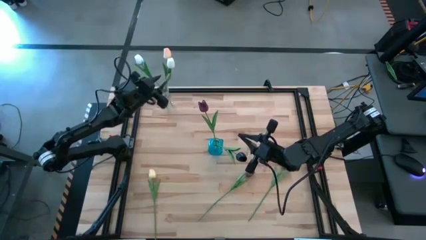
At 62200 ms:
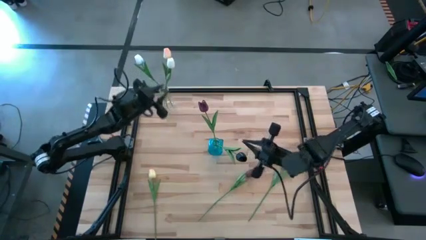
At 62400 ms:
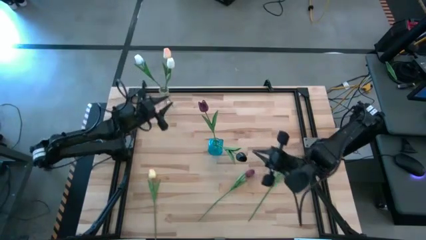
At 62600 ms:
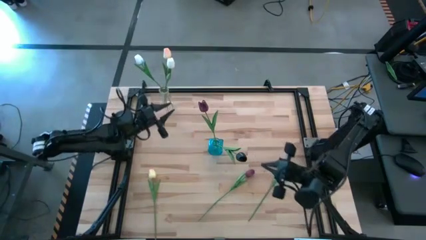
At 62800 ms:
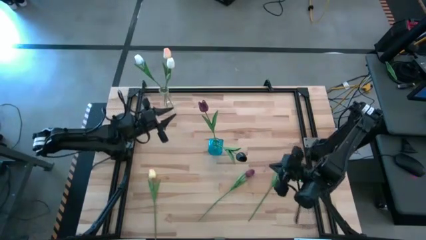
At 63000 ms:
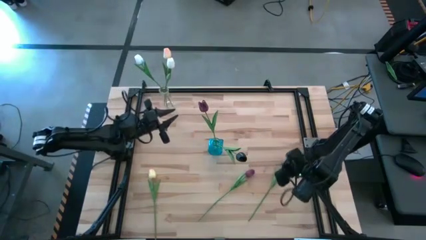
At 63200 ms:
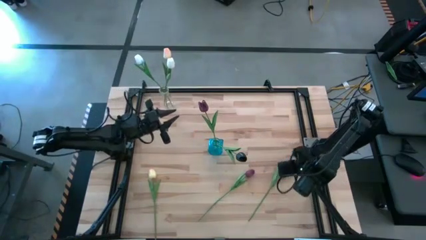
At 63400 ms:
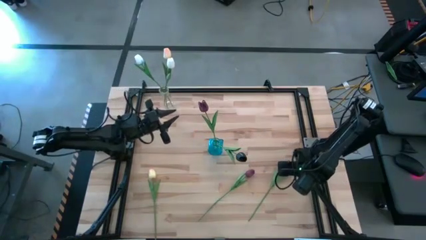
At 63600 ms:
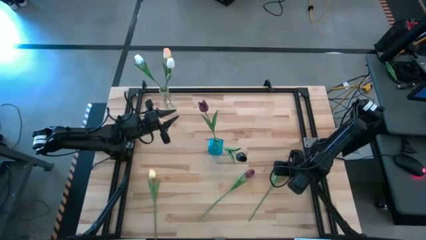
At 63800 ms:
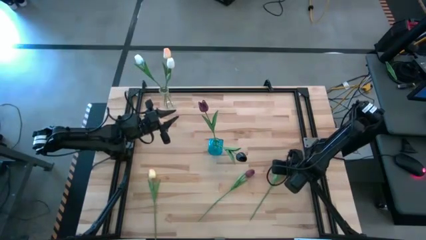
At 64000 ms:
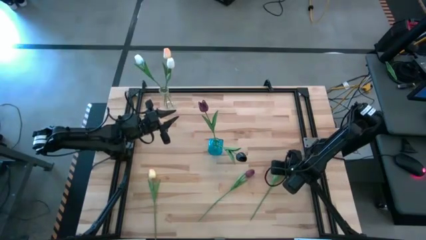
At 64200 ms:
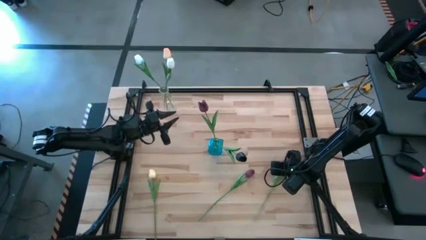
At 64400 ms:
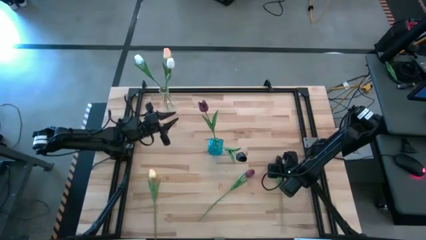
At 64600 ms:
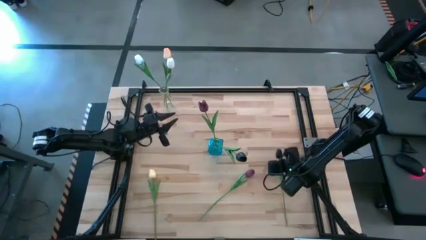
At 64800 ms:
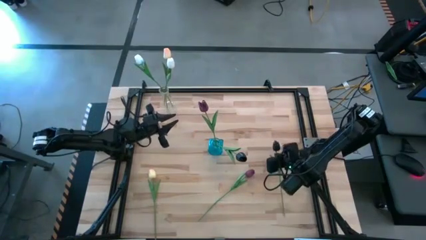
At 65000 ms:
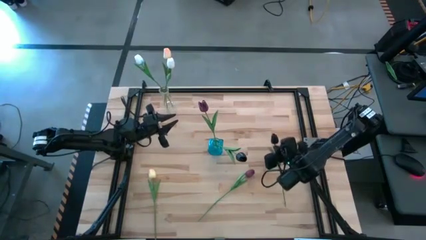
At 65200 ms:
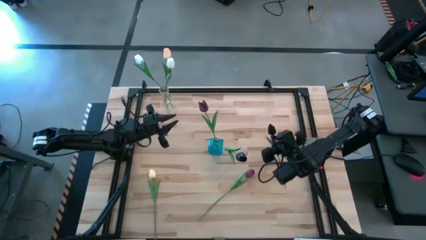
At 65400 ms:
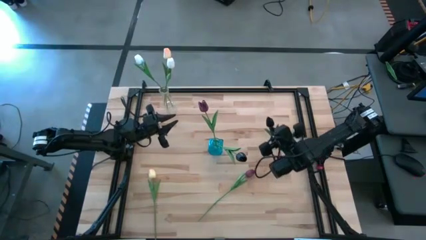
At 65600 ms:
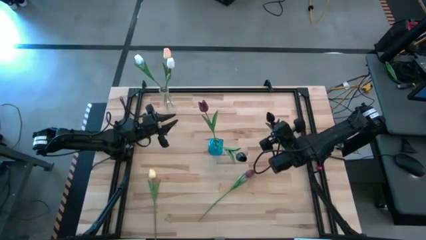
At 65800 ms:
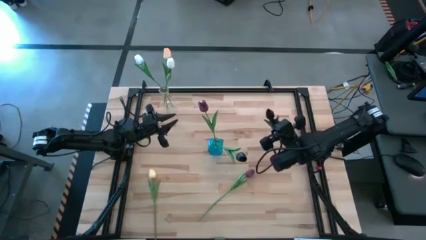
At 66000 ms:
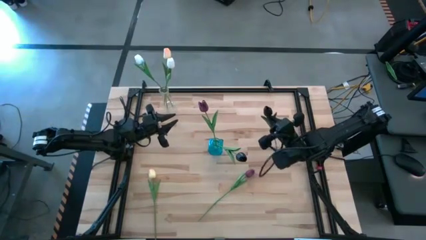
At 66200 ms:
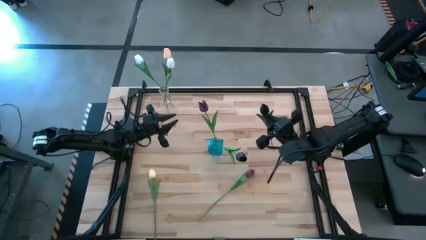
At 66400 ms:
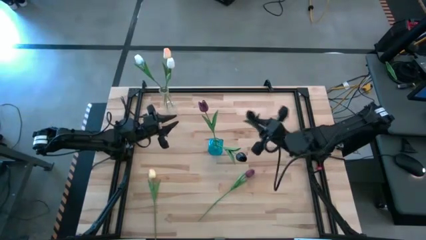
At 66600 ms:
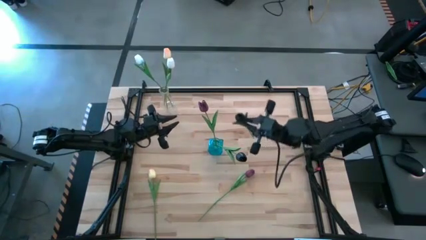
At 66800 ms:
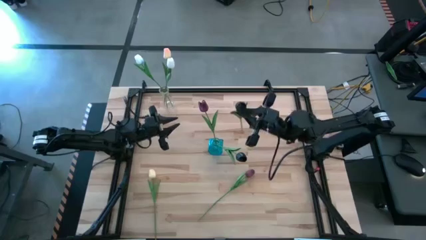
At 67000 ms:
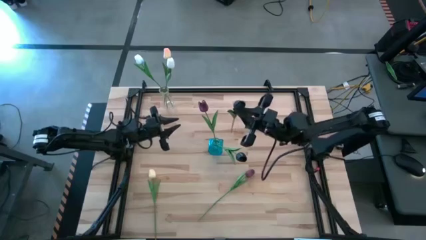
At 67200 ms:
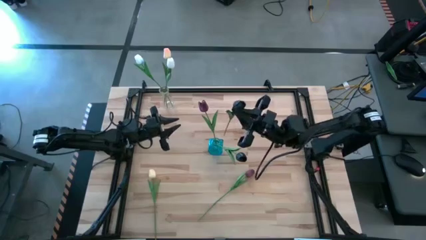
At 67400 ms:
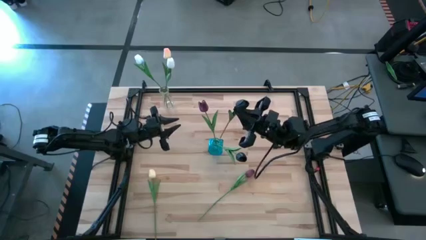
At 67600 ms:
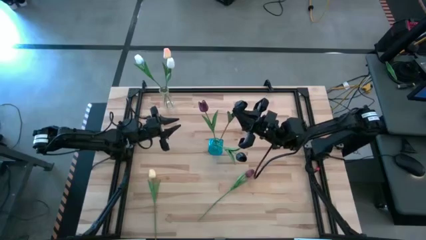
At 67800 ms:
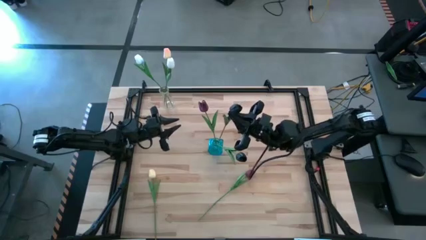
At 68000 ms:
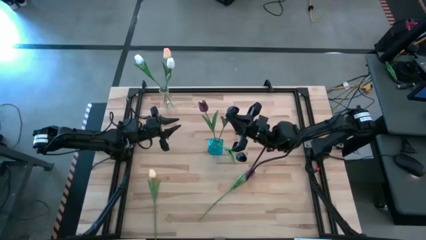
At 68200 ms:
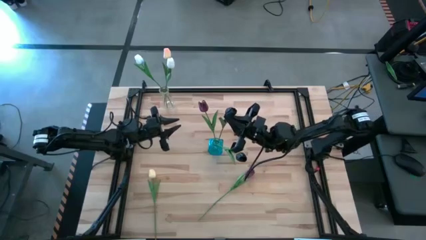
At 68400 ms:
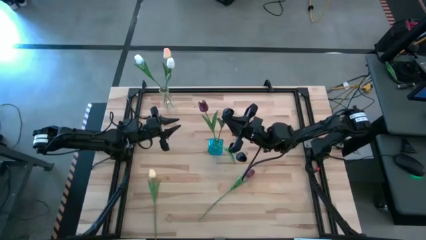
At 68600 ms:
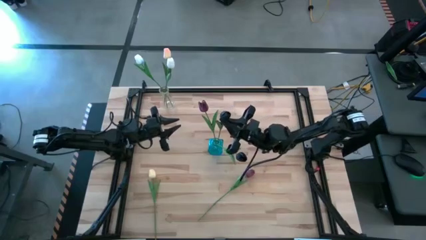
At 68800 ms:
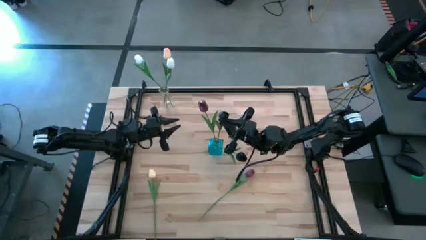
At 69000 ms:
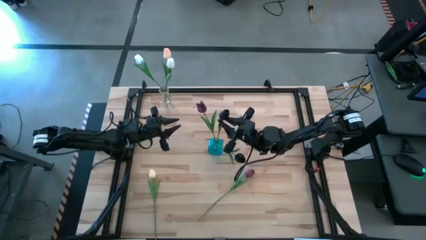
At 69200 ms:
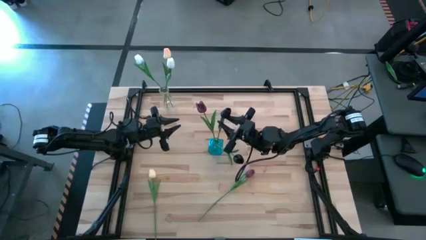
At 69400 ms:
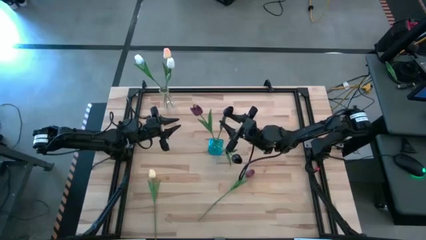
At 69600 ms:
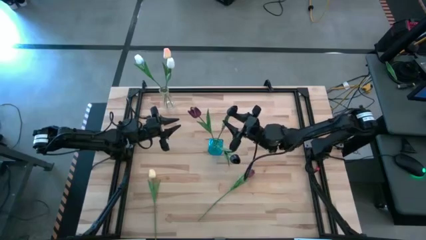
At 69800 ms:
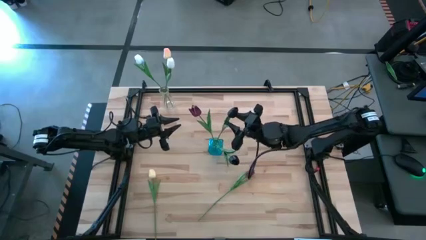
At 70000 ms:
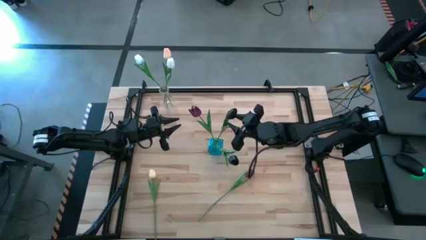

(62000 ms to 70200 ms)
Task: Sort flowers into vase by color
Put the black flower into the blue vase

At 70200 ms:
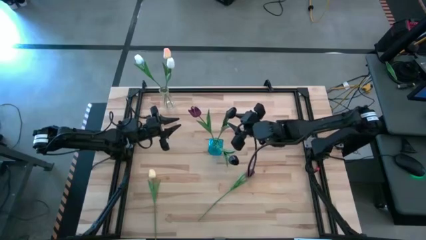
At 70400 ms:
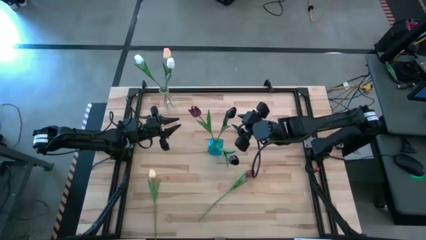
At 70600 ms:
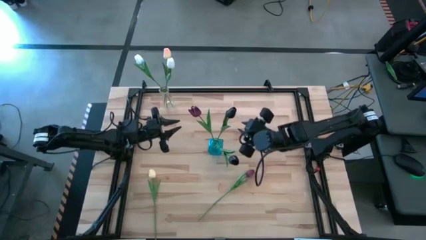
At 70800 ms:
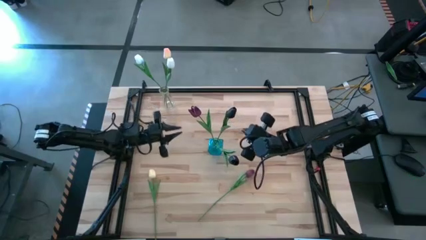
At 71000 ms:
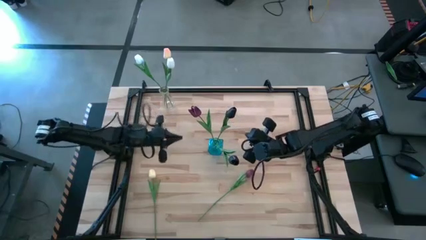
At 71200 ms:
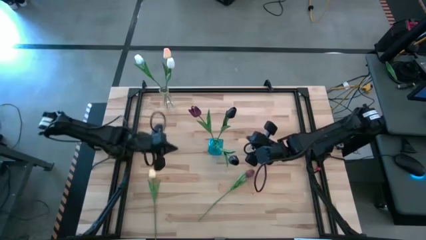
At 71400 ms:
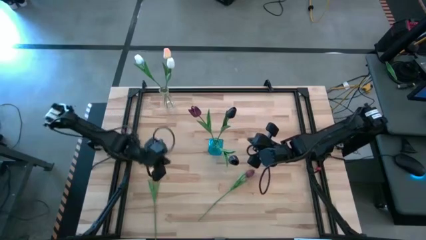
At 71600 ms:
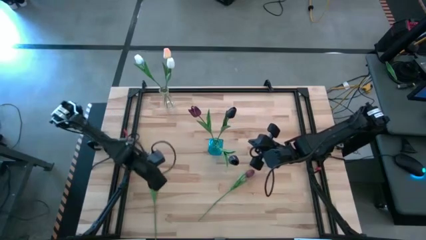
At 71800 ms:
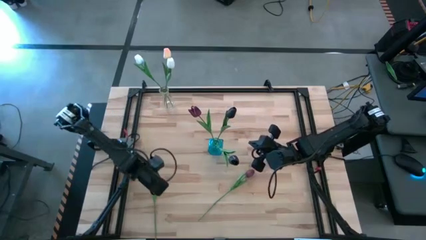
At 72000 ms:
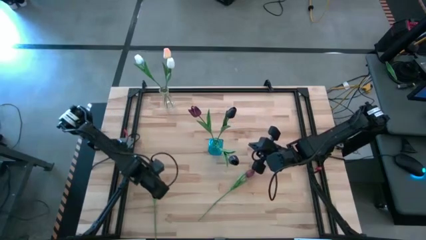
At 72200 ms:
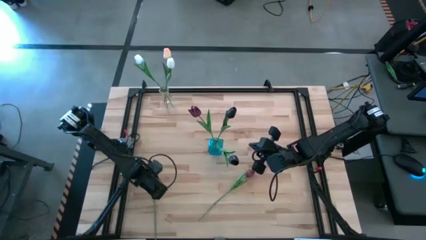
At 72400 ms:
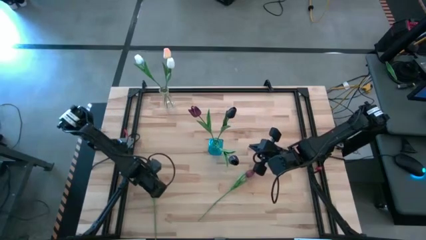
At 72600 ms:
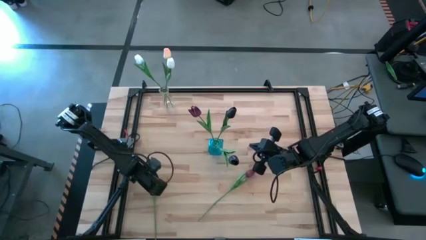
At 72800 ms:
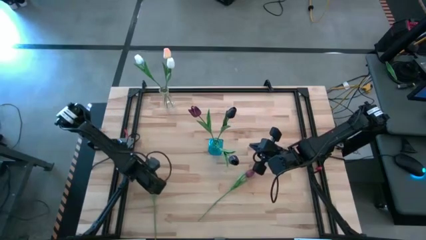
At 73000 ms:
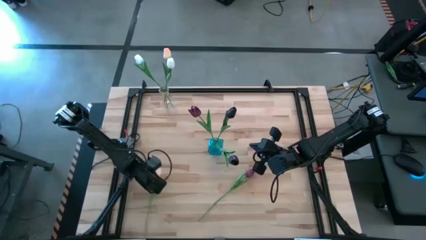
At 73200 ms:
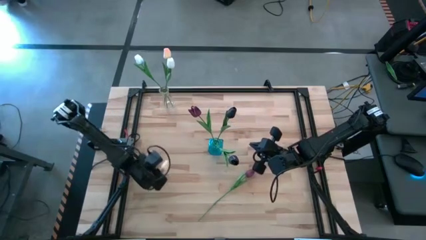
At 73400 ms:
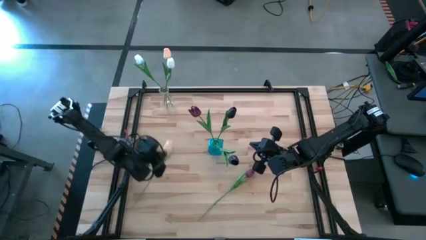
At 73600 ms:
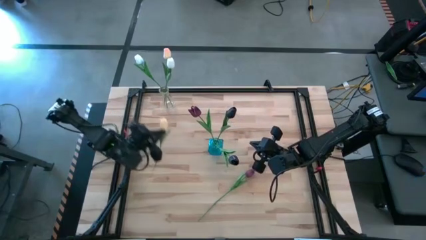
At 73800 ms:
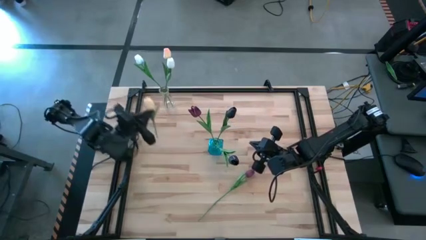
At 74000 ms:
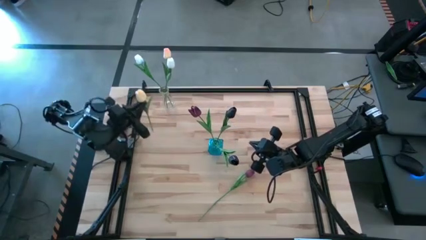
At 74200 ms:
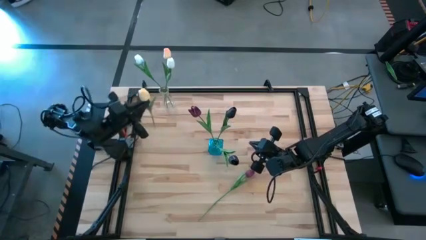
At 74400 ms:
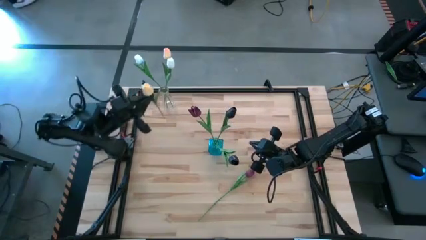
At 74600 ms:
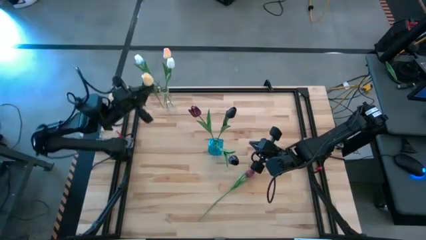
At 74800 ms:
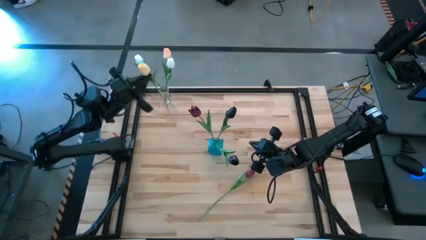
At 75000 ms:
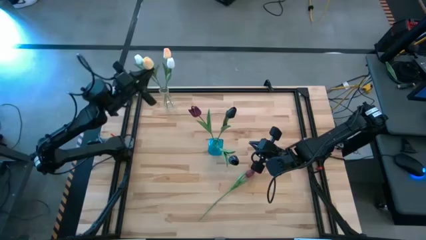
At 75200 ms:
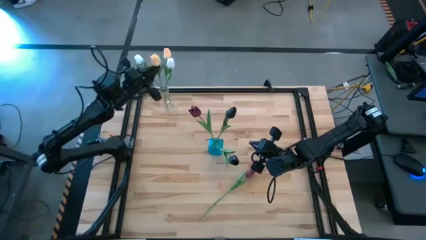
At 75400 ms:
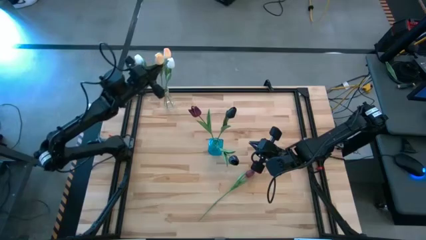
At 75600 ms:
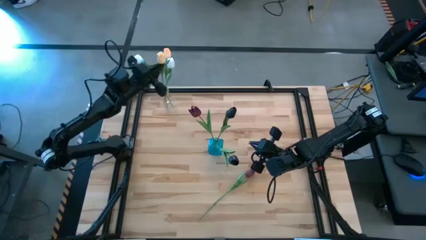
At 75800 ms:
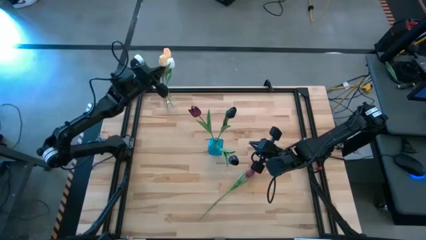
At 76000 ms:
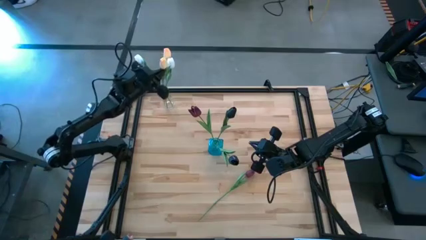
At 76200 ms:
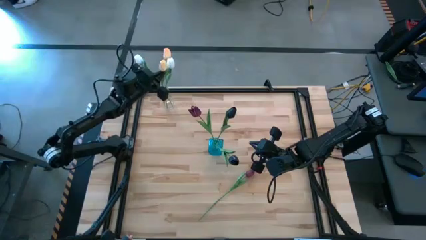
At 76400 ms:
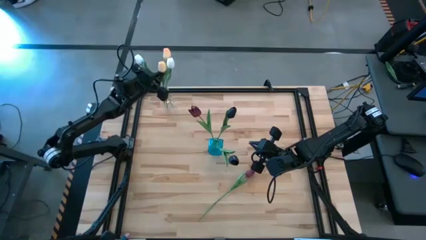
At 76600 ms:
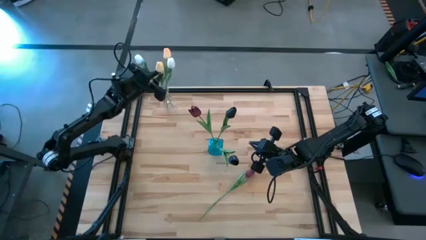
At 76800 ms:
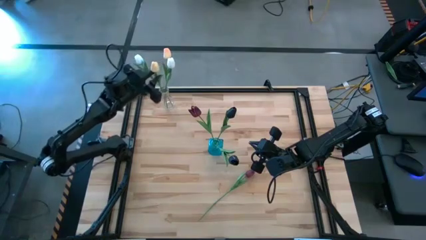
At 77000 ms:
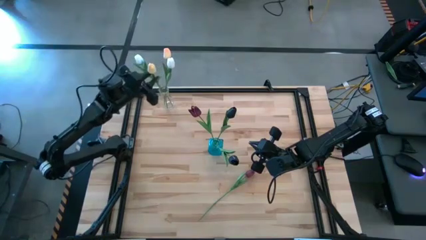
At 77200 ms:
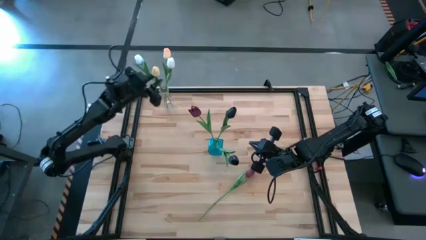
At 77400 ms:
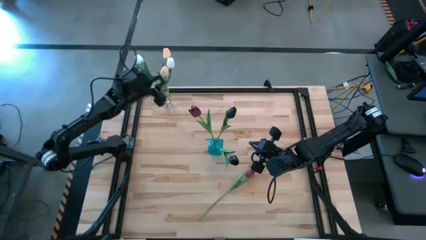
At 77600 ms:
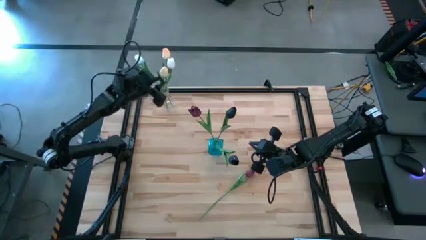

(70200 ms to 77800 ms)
Put the orange flower into the transparent vase

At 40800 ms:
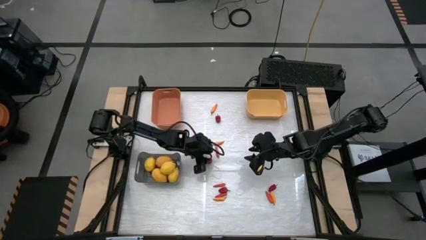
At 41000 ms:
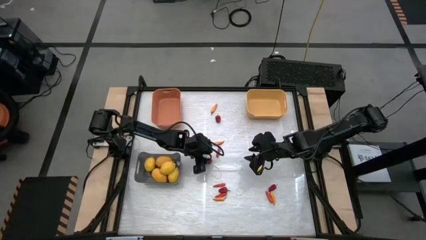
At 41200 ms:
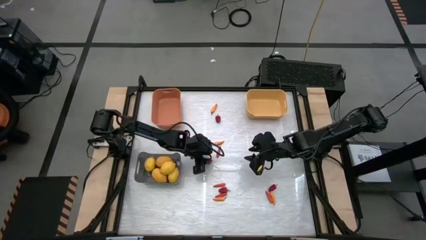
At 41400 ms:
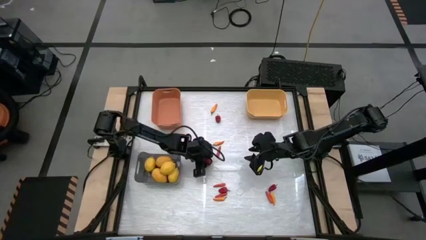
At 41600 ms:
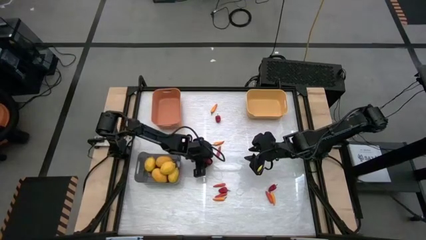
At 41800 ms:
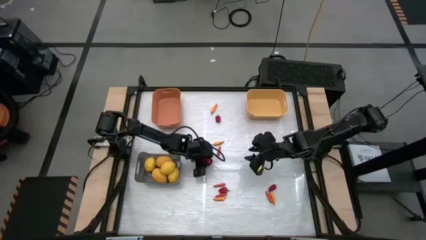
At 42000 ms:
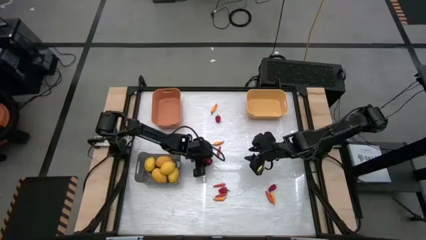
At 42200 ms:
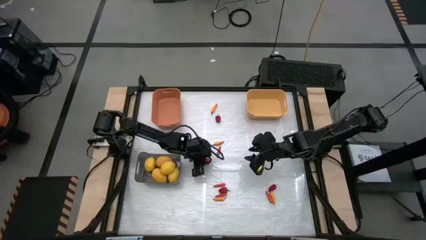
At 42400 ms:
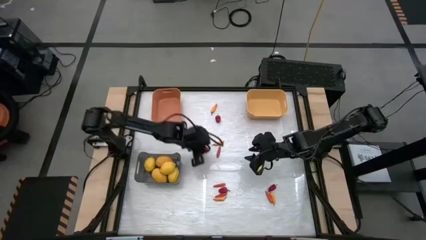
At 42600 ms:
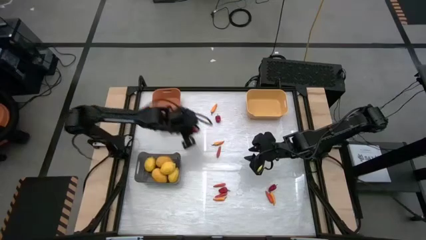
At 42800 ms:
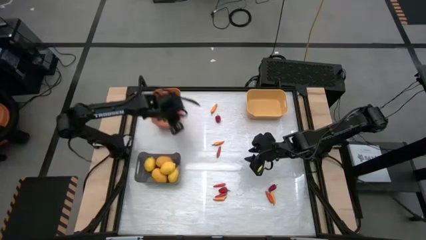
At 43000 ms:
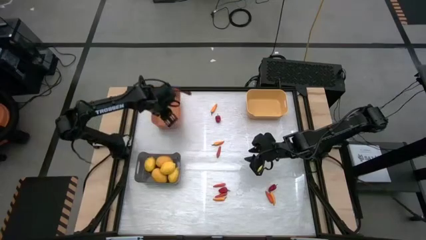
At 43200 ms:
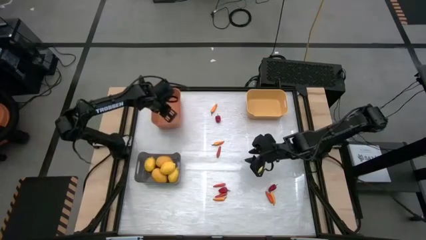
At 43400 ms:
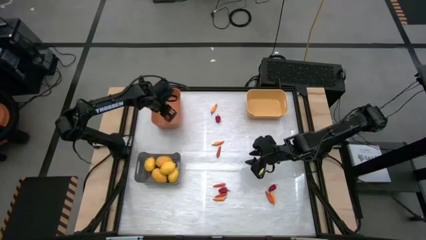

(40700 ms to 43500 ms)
Task: Sort produce into baskets
Put the red bell pepper into the orange bin
